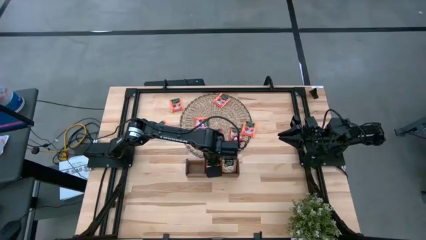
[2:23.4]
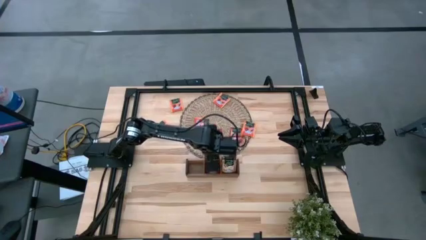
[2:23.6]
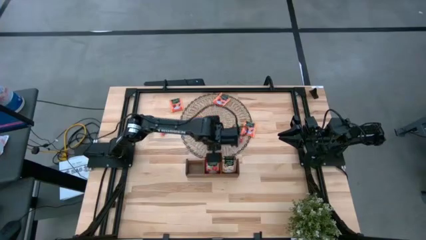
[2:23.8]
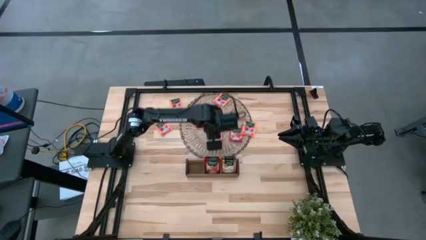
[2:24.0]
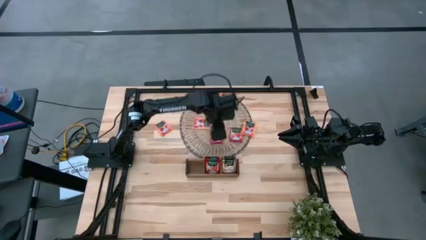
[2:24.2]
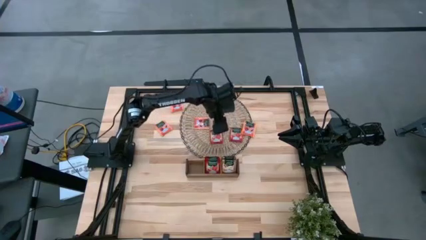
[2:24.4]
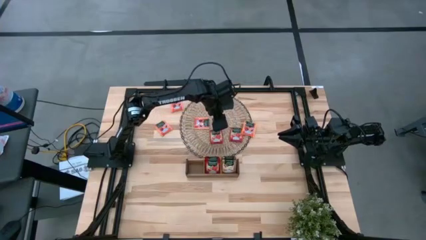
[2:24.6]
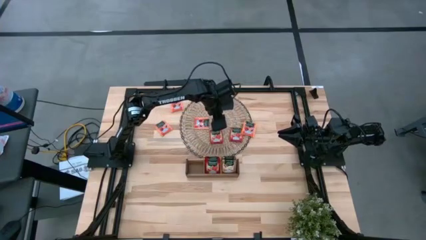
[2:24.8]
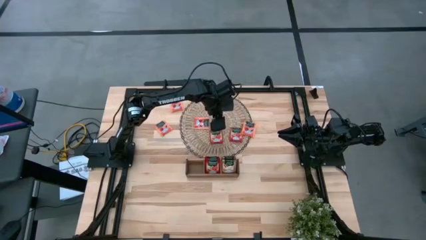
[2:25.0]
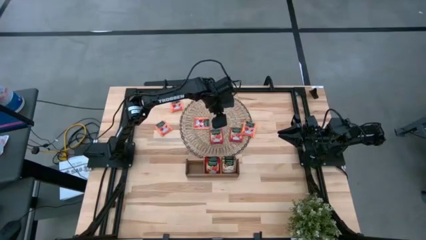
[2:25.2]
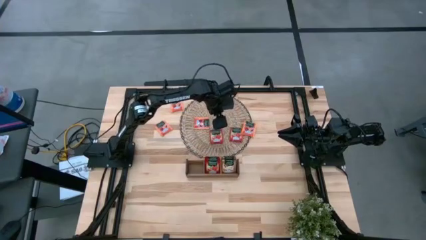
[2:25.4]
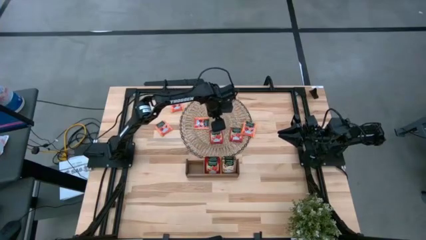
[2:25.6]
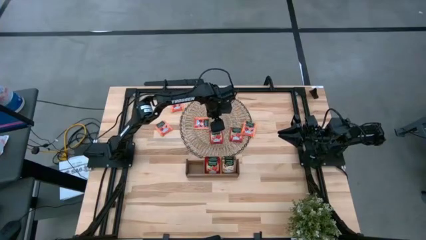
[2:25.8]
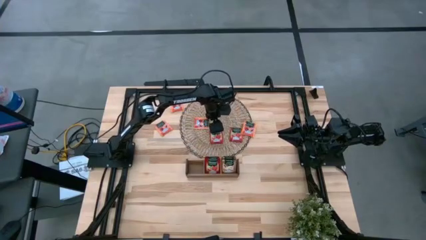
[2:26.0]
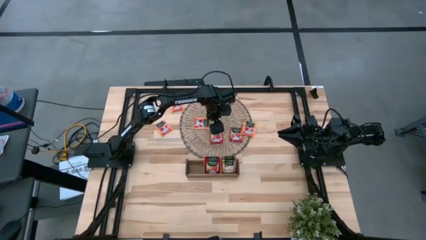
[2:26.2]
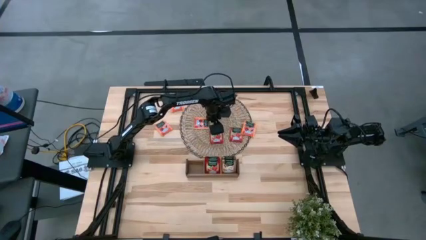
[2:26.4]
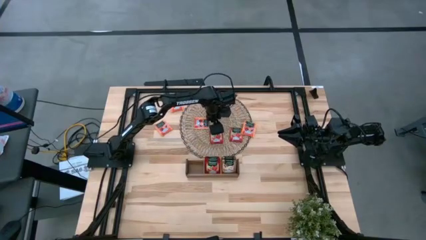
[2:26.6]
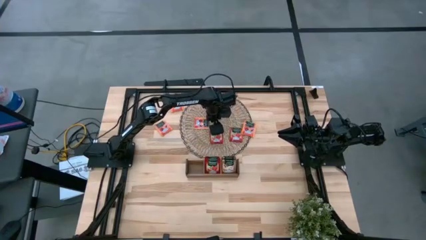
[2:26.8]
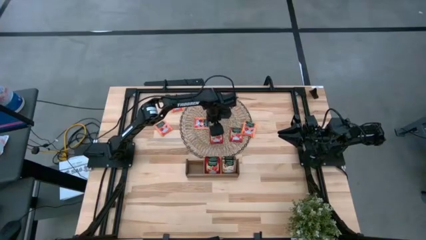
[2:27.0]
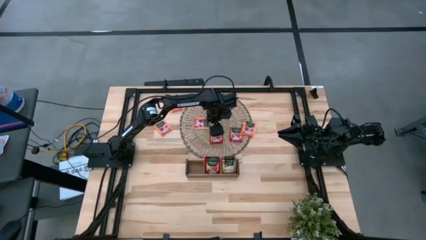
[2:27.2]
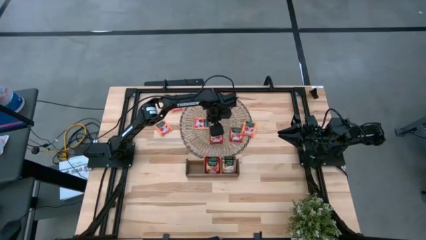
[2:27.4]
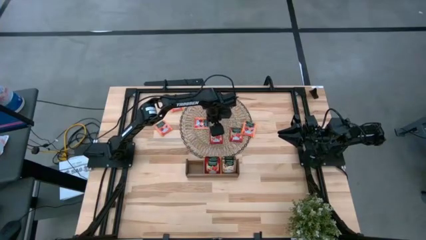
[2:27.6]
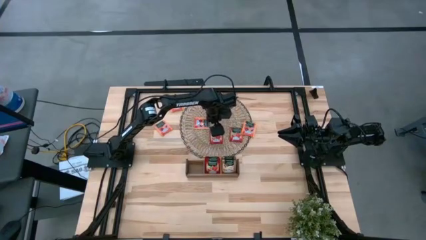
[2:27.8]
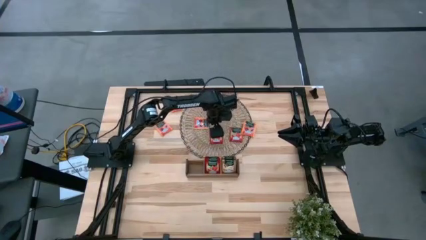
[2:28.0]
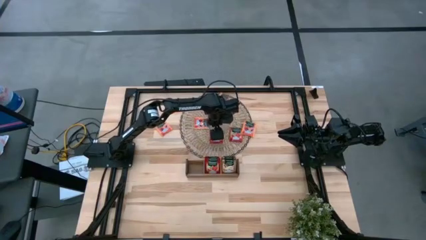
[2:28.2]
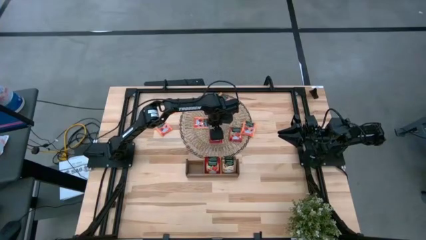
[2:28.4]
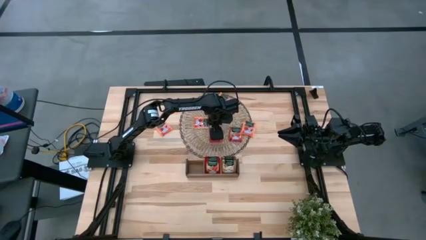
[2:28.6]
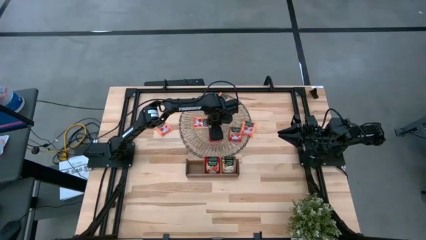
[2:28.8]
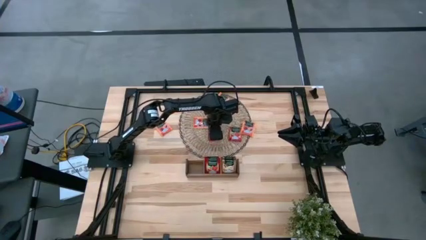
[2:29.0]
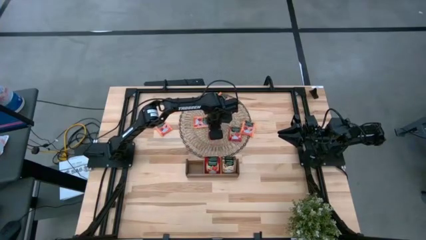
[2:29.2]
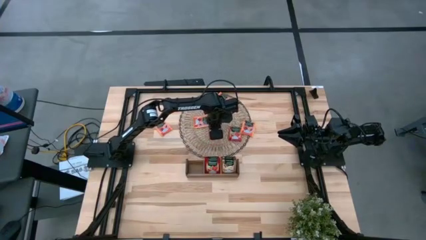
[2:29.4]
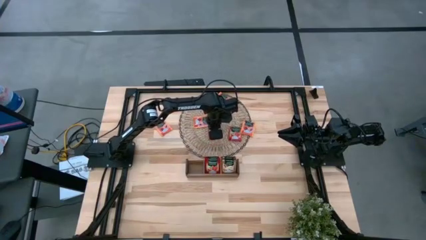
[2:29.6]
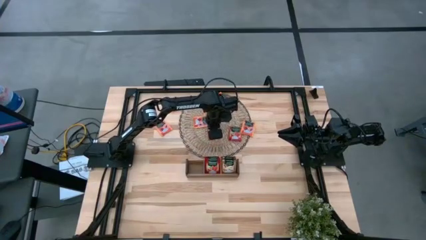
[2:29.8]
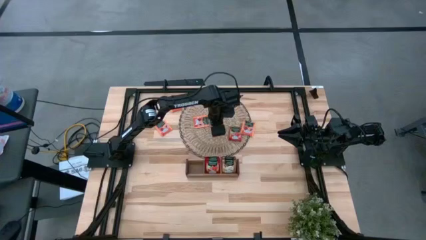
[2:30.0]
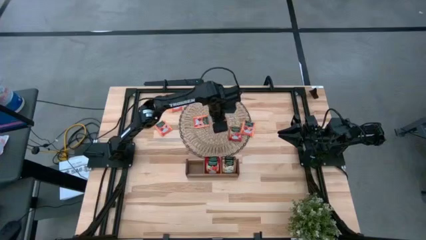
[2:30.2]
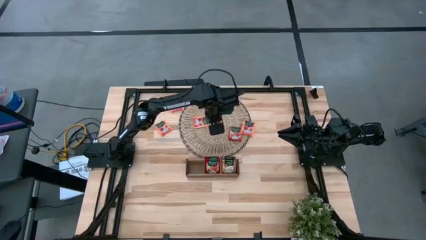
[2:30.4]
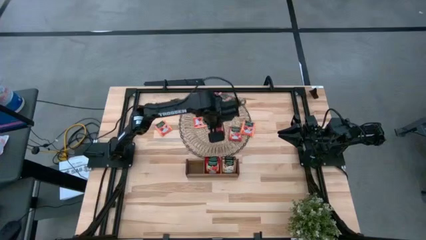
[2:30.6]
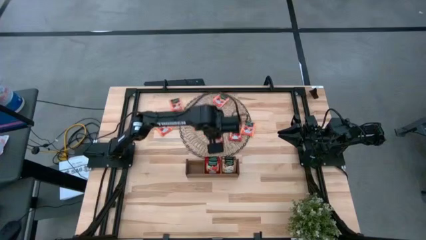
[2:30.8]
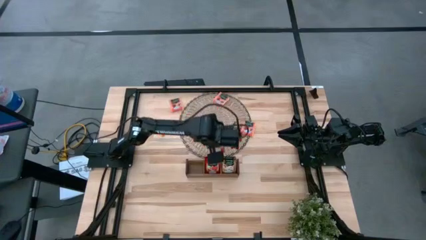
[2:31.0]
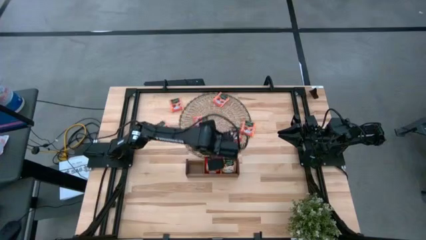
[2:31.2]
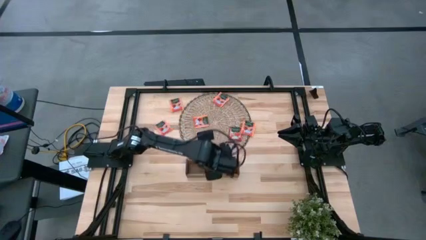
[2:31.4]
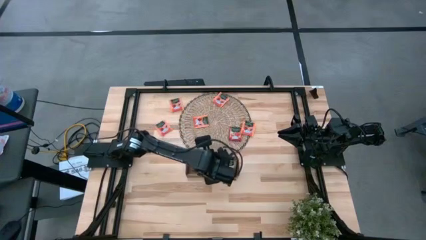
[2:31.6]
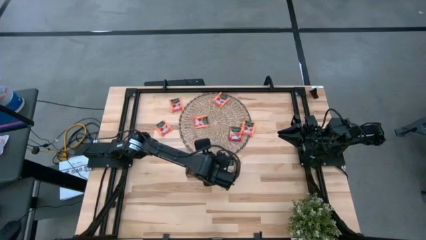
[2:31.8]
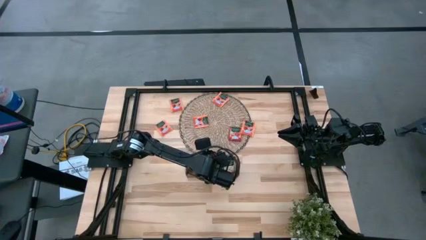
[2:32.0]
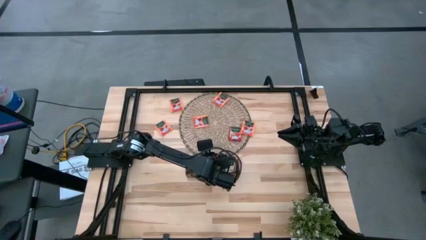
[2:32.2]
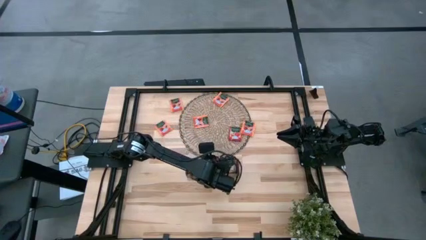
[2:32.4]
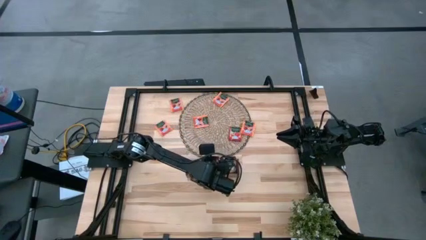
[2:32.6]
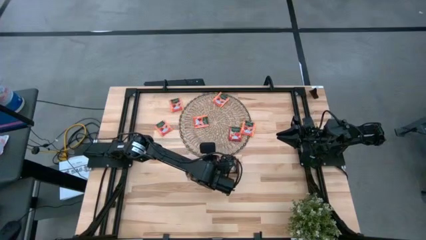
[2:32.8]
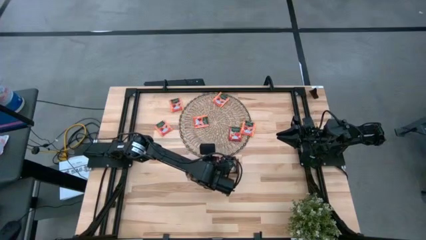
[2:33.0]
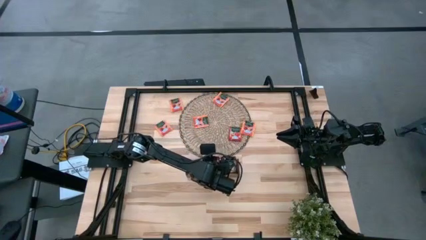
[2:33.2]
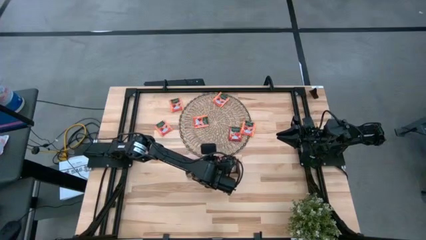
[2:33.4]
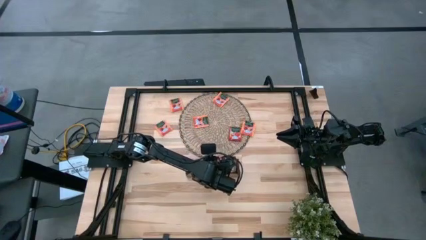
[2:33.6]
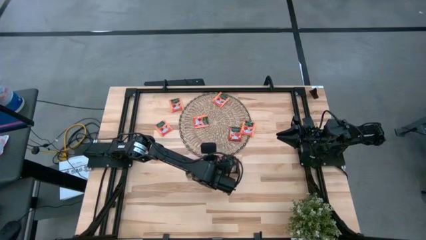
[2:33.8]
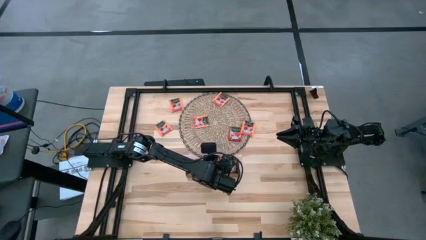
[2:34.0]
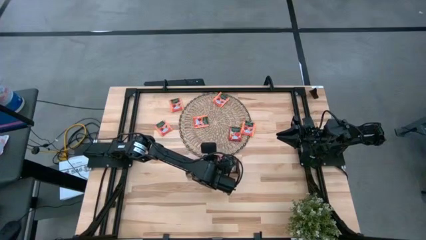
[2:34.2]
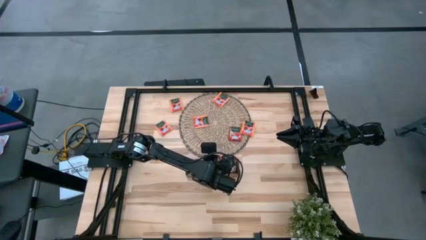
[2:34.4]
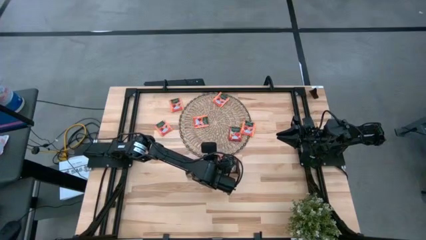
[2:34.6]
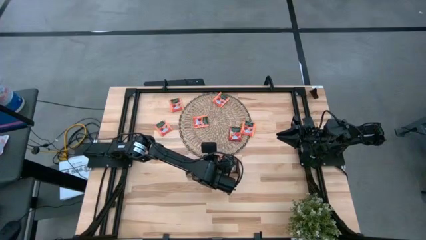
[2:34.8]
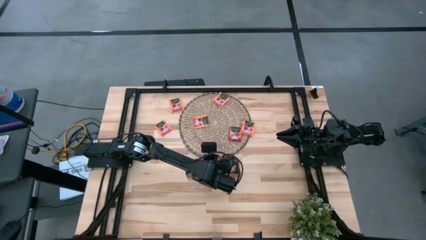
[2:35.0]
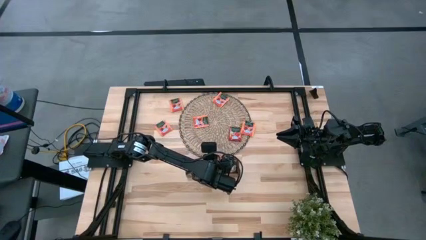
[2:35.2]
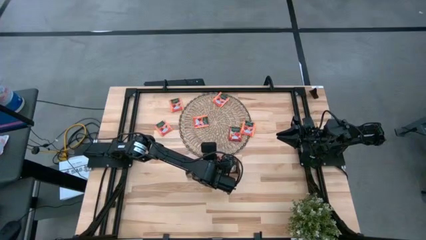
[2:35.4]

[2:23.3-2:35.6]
Task: Pick & Place Tea
Put the red tea bag into the middle section of the wooden organizer
